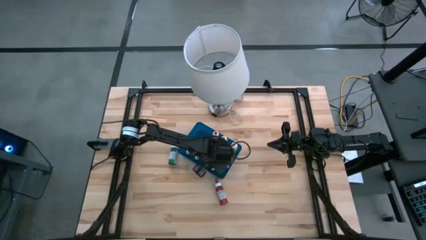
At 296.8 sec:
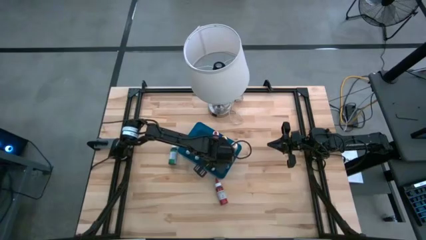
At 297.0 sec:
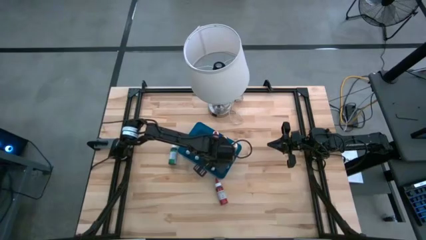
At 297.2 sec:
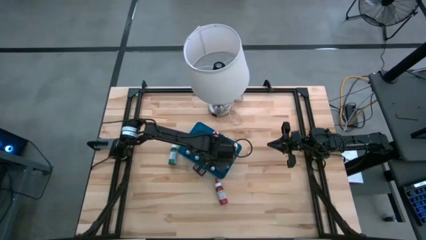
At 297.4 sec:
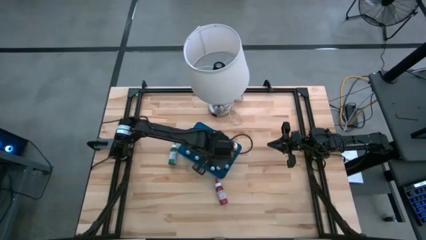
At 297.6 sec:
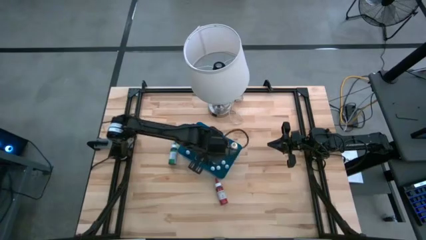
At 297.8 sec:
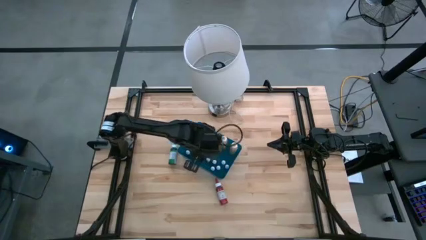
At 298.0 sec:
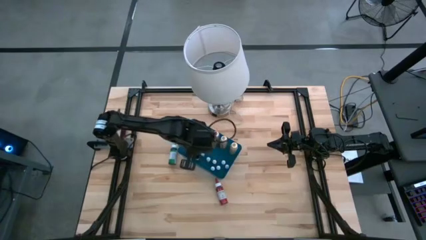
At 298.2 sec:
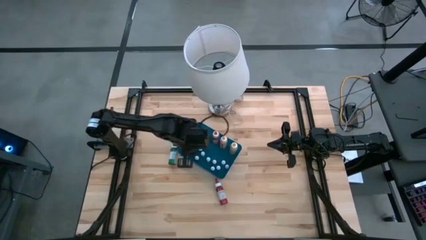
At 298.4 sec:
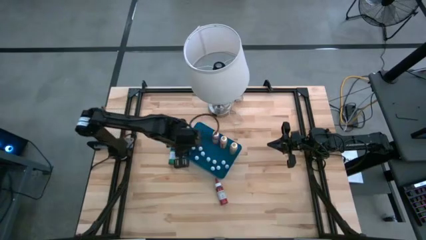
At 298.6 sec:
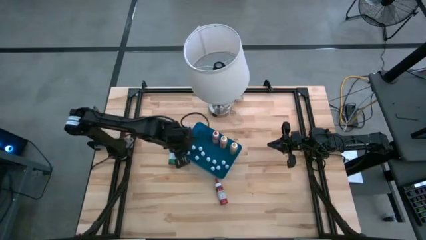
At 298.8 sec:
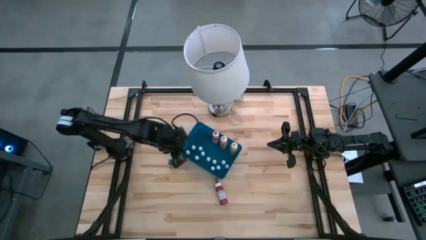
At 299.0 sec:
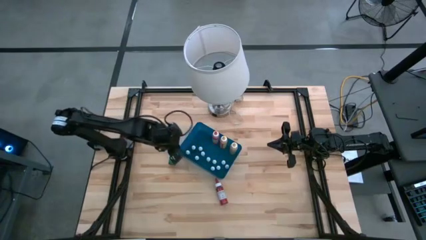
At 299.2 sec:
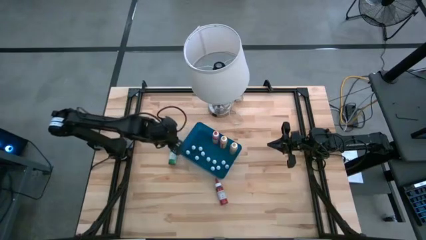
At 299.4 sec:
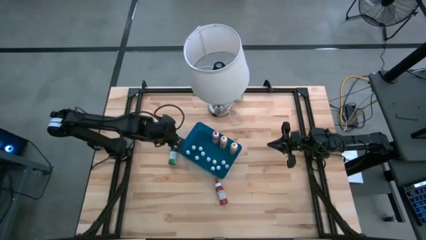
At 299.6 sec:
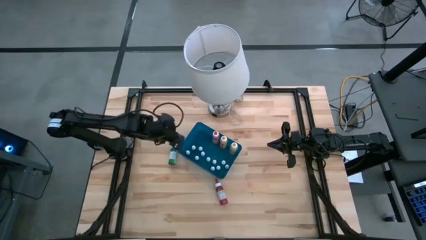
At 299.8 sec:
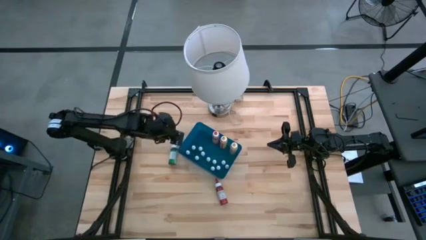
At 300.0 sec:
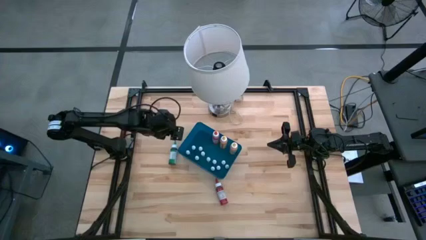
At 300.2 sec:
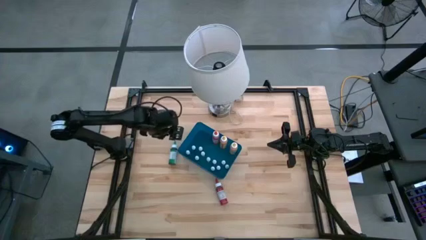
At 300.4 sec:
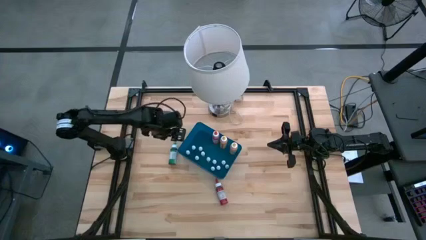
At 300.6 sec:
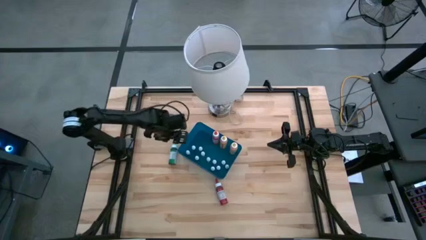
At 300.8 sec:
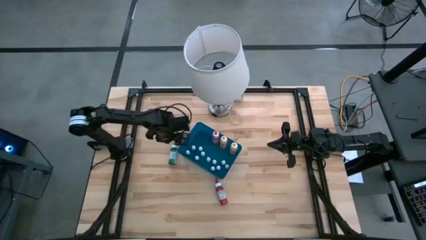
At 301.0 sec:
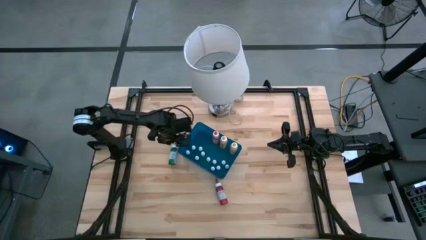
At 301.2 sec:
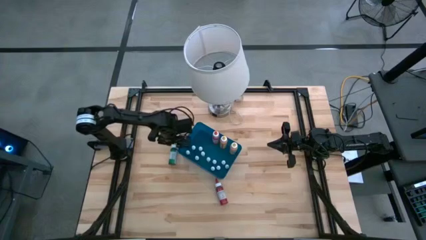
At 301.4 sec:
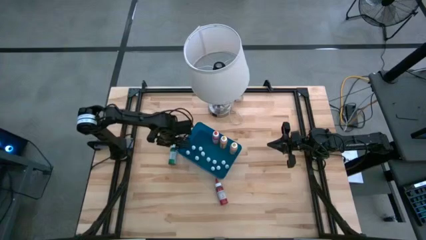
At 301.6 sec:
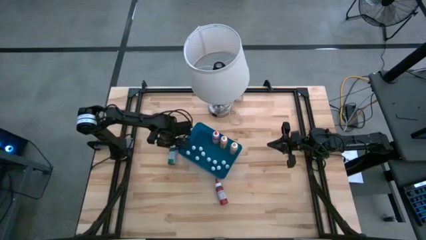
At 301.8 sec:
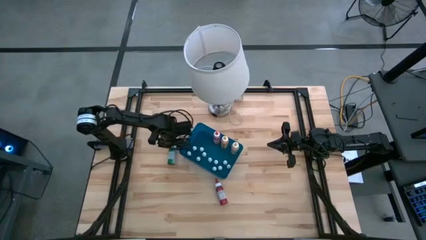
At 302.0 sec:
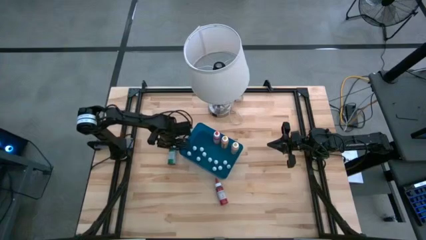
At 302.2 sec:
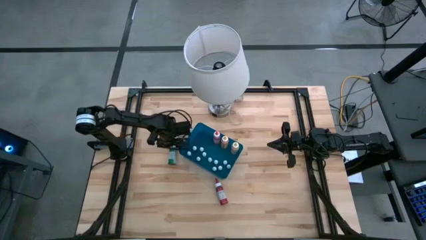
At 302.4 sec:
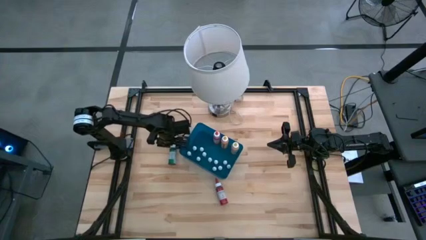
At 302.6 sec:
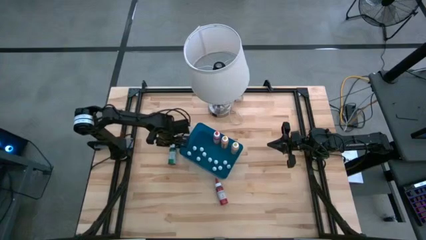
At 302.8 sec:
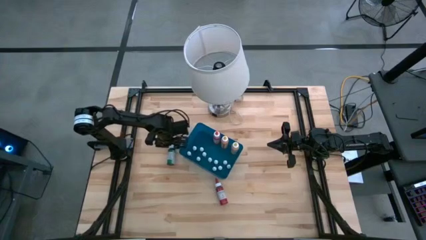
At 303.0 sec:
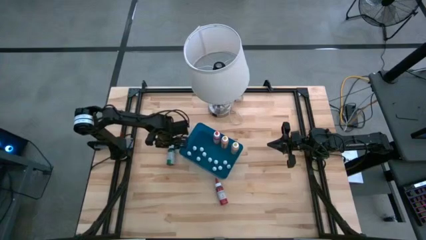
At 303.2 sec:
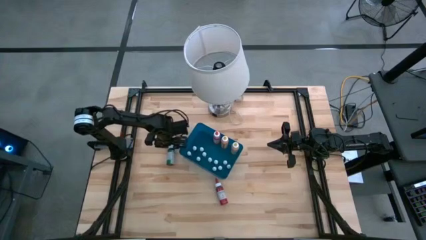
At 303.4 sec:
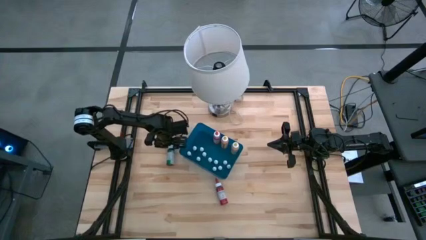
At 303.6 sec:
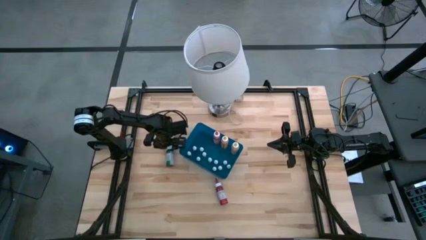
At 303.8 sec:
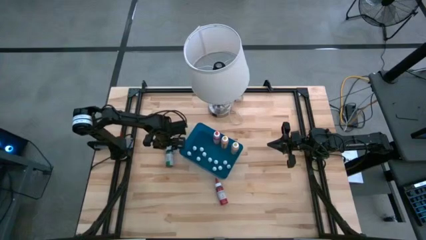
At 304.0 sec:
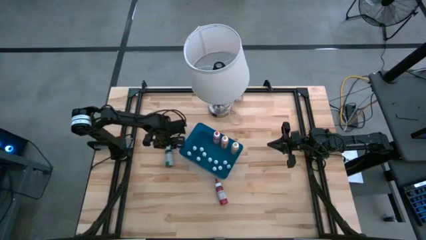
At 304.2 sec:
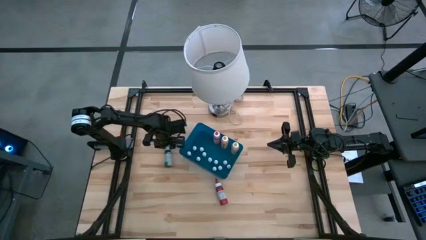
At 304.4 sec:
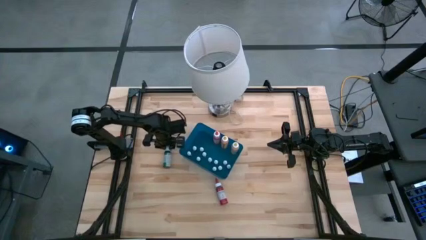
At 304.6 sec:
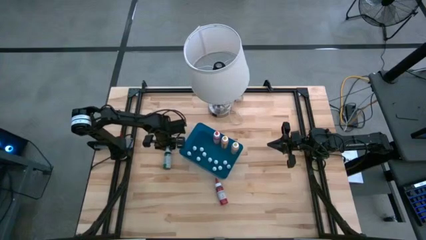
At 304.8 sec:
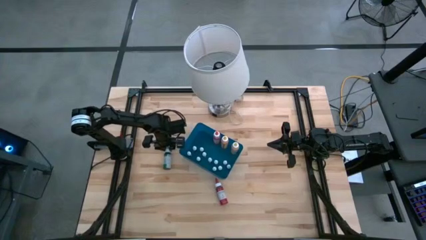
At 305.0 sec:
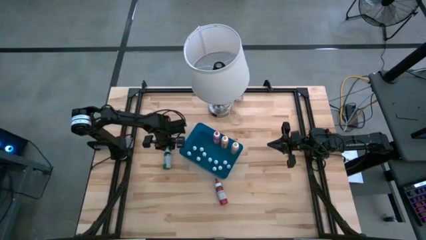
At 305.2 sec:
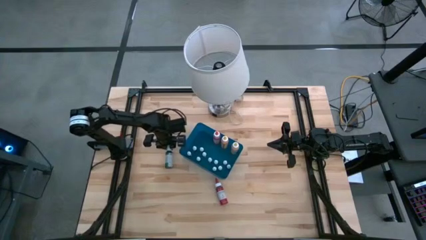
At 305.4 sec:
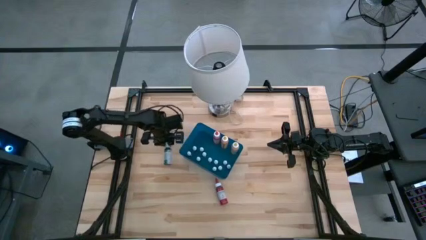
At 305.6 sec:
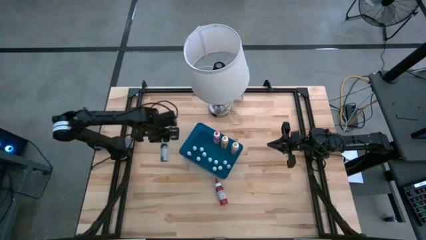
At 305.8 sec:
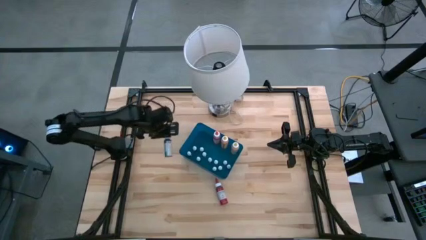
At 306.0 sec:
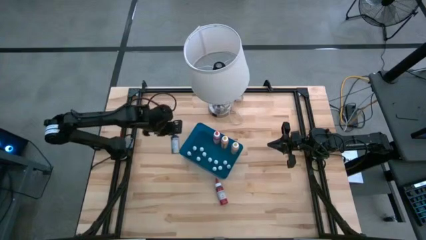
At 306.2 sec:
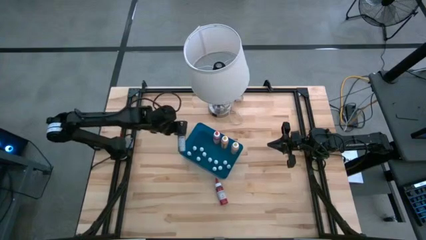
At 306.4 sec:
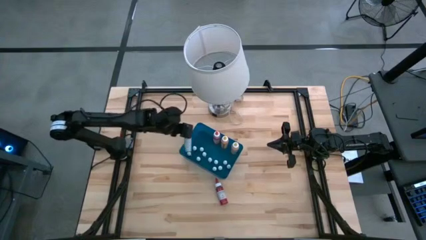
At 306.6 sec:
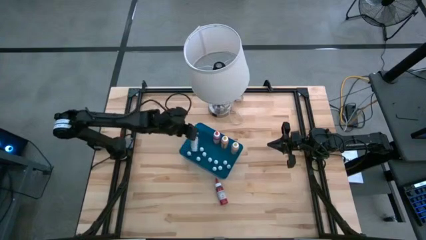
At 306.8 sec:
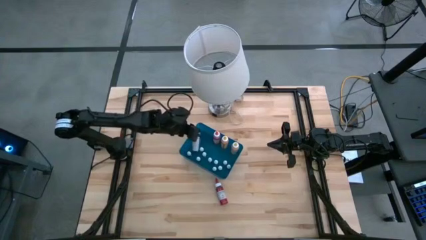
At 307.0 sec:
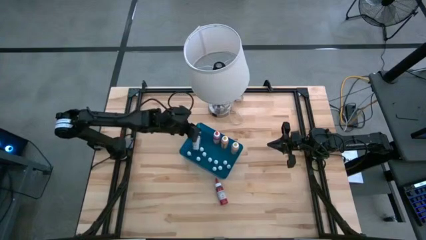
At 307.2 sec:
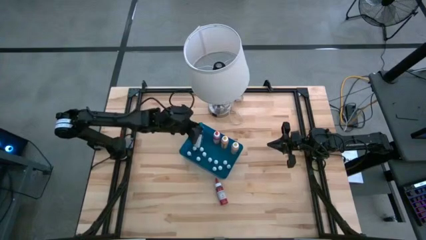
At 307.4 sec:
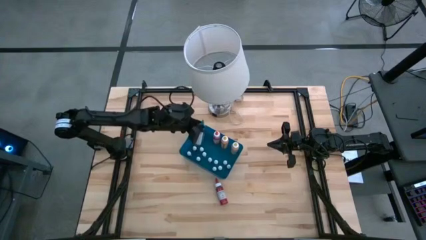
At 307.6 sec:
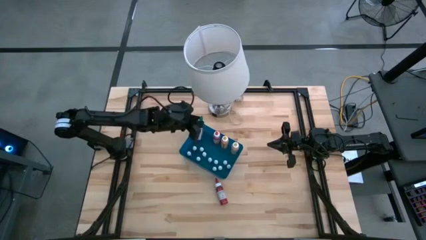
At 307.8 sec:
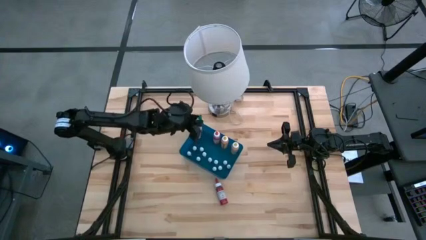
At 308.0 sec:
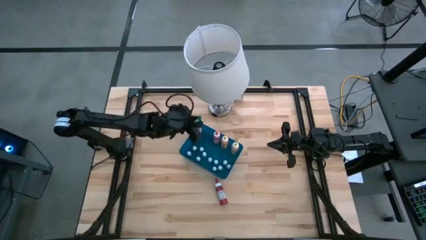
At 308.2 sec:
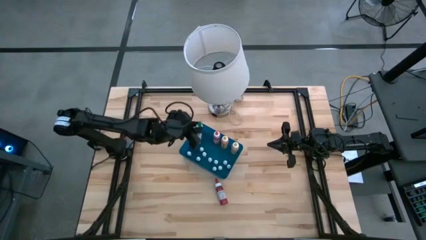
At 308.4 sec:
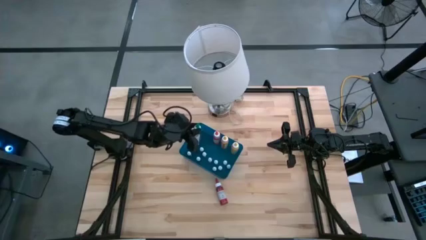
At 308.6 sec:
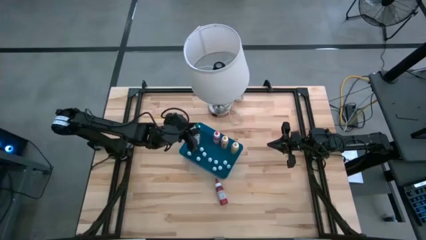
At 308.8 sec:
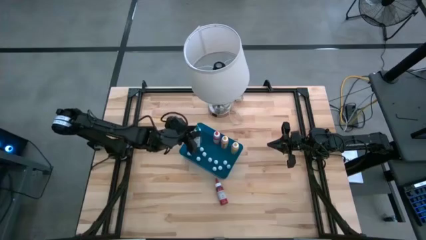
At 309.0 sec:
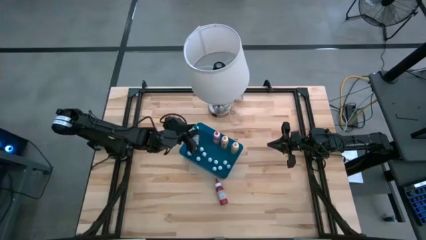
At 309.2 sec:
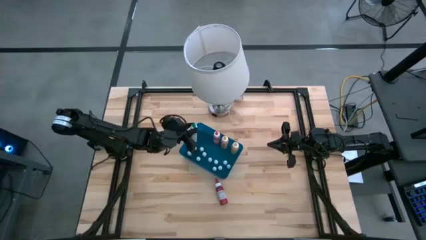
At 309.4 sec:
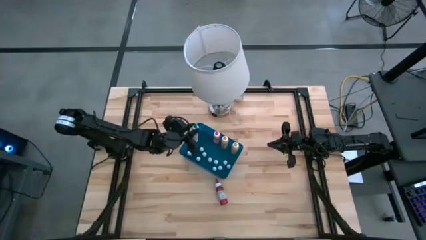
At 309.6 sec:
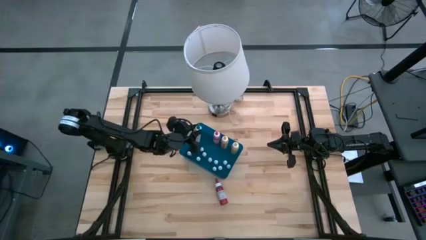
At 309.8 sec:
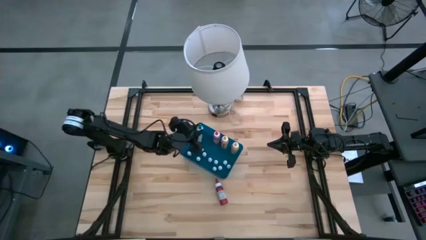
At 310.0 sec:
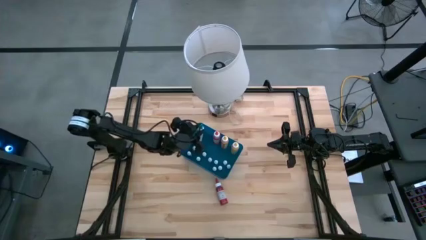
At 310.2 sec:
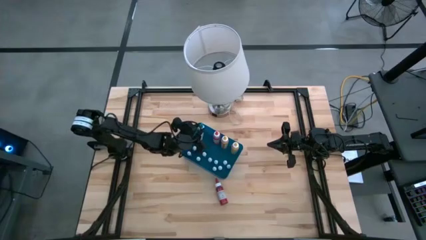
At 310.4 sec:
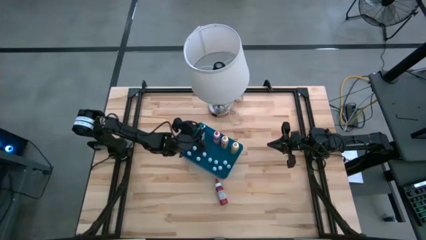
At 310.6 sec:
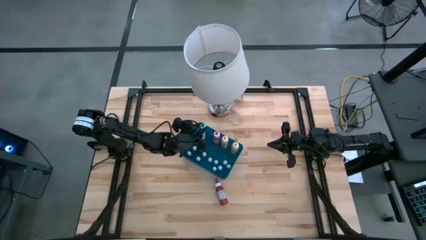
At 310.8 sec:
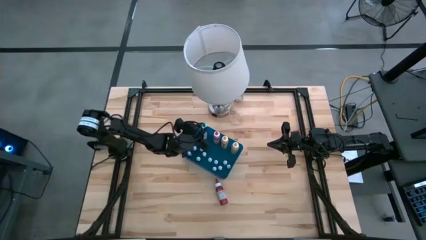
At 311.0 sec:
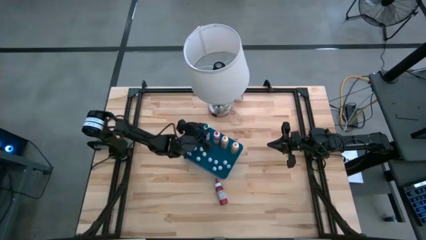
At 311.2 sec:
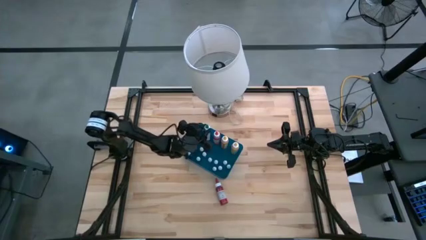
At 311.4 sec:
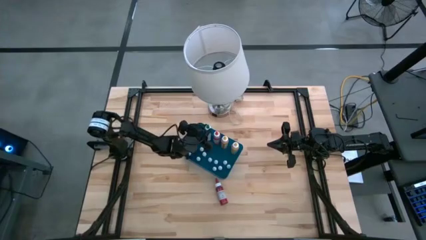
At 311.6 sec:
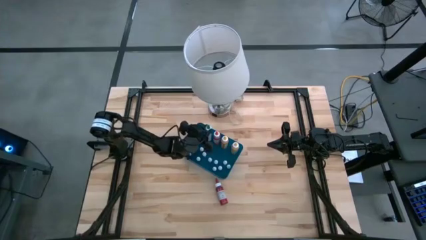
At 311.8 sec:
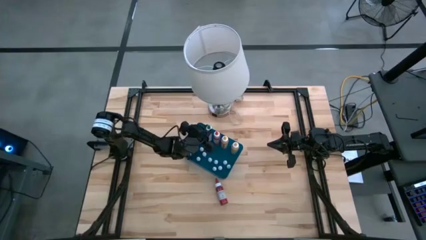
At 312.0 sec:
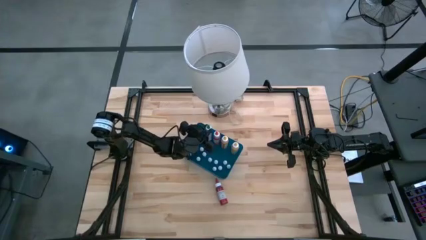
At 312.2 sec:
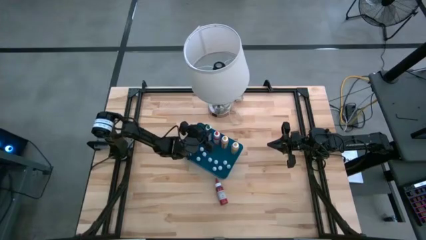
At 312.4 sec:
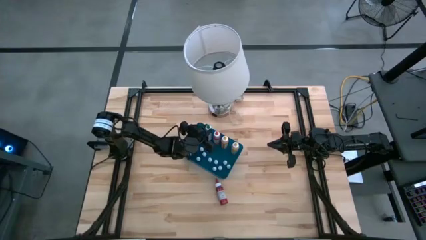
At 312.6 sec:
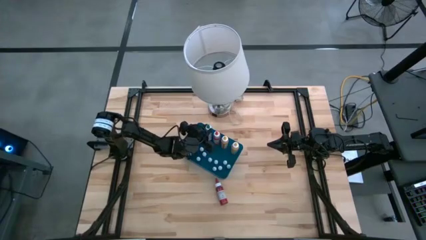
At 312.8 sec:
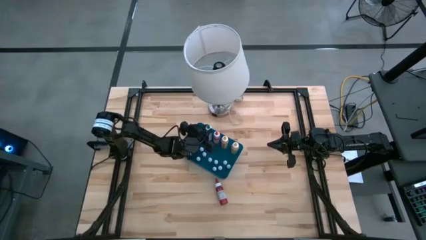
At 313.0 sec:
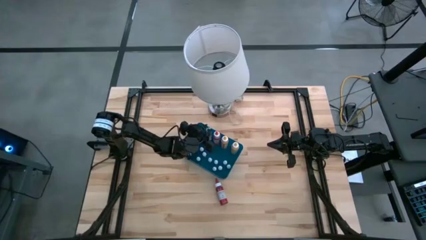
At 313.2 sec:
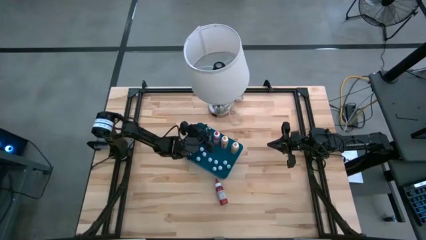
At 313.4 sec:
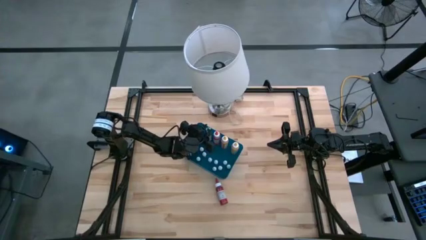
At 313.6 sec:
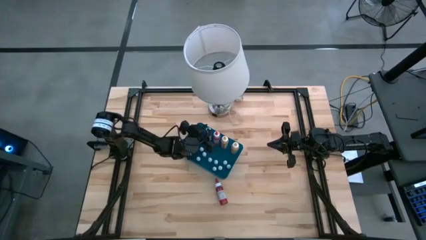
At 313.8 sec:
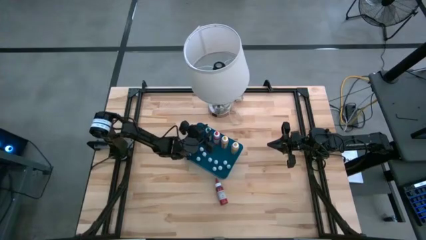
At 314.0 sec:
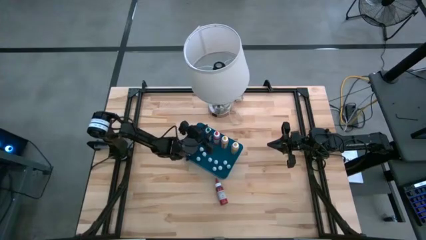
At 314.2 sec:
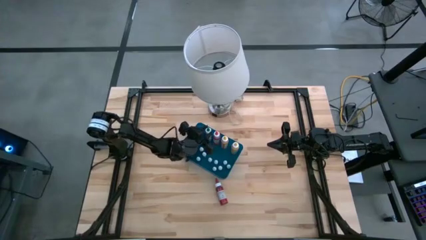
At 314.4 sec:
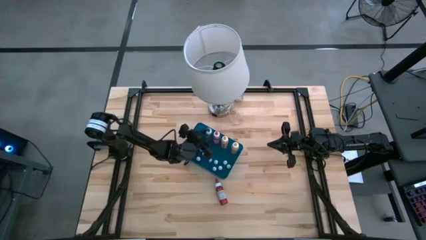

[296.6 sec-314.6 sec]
Task: Pick & Place food coloring
Put the large green food coloring bottle into the blue container
